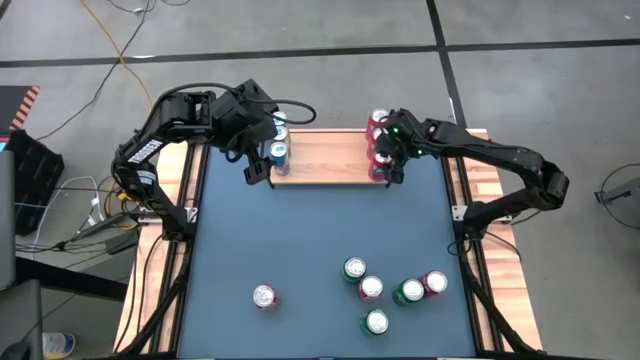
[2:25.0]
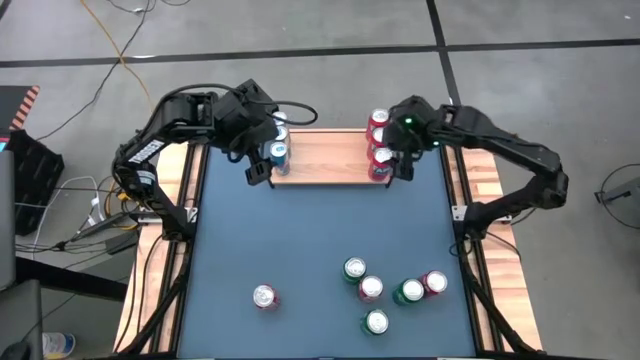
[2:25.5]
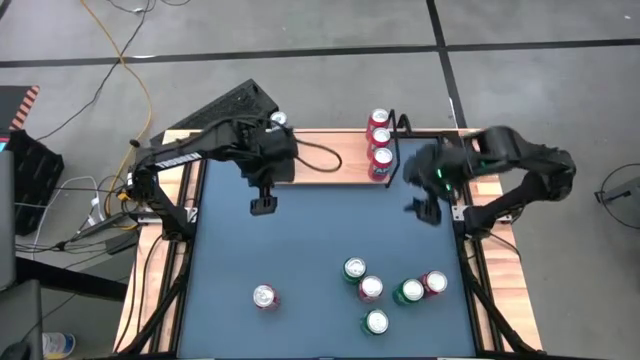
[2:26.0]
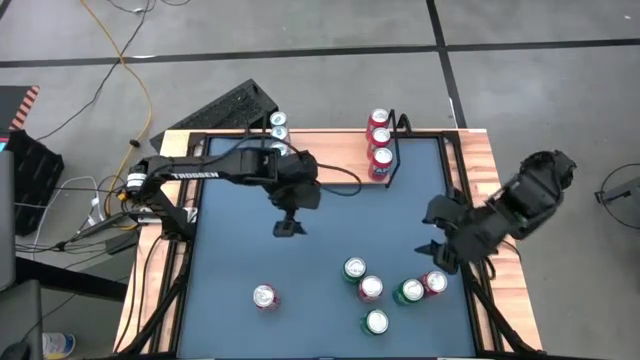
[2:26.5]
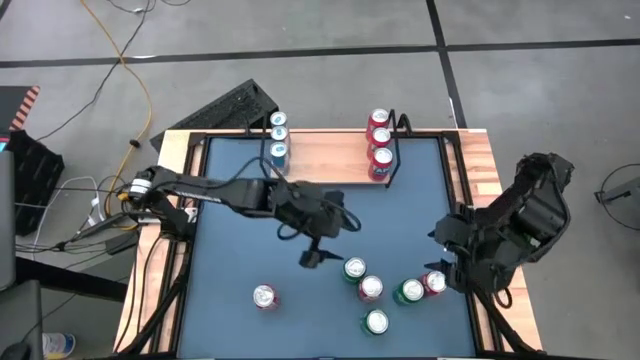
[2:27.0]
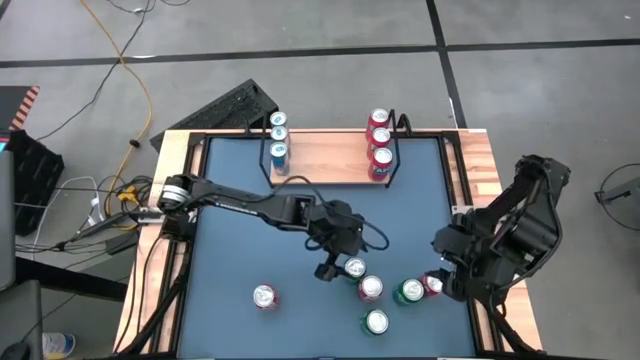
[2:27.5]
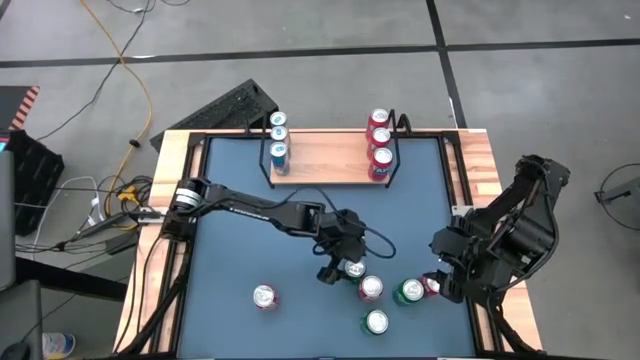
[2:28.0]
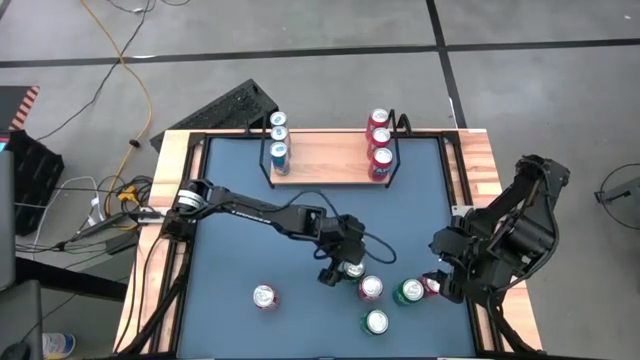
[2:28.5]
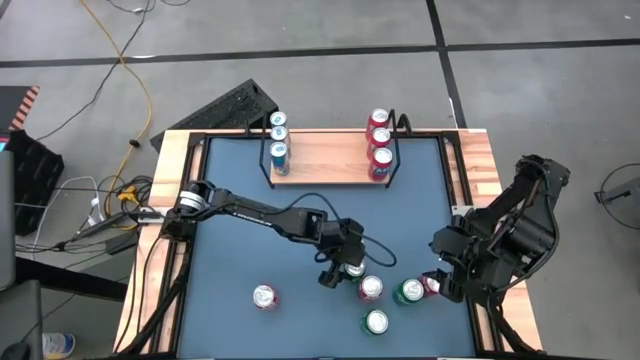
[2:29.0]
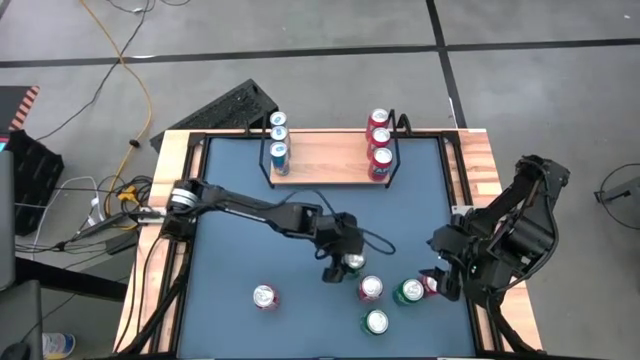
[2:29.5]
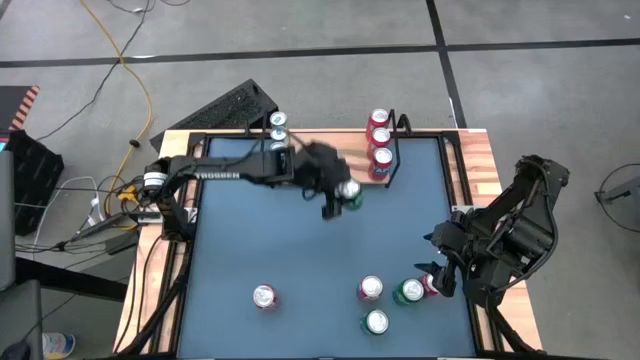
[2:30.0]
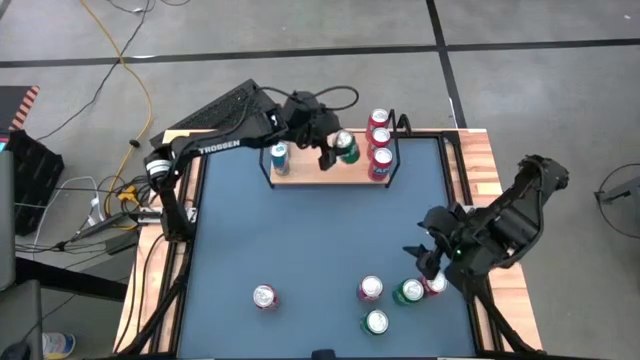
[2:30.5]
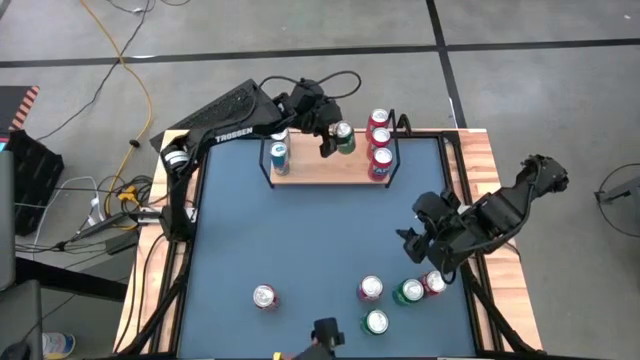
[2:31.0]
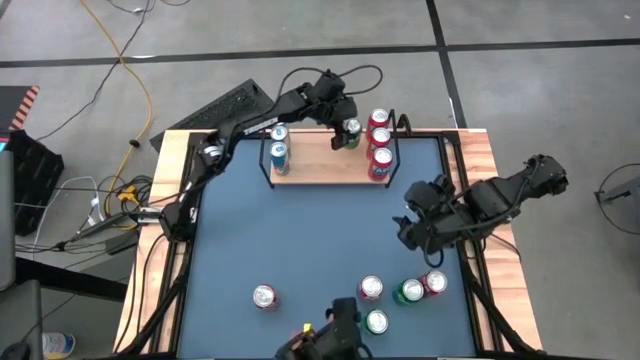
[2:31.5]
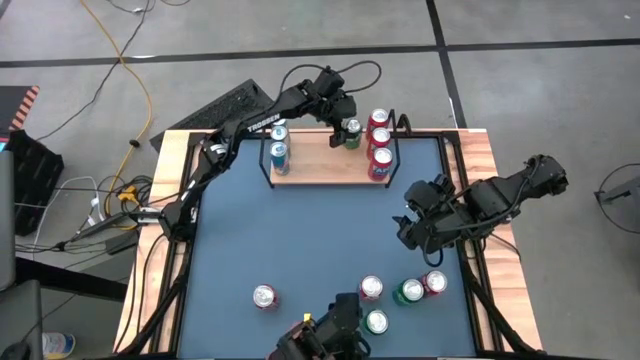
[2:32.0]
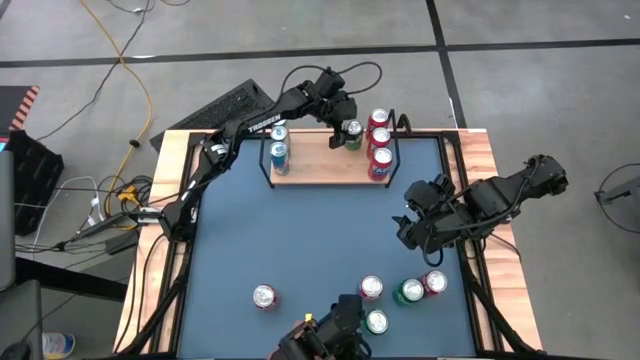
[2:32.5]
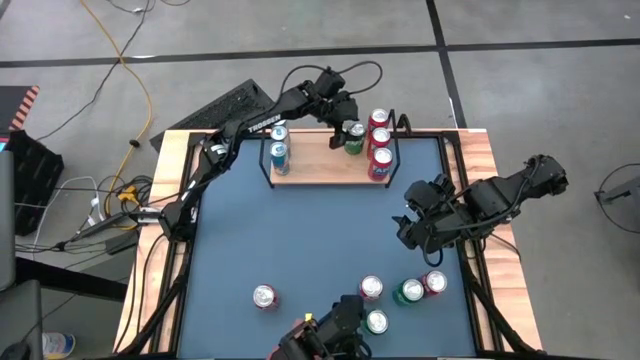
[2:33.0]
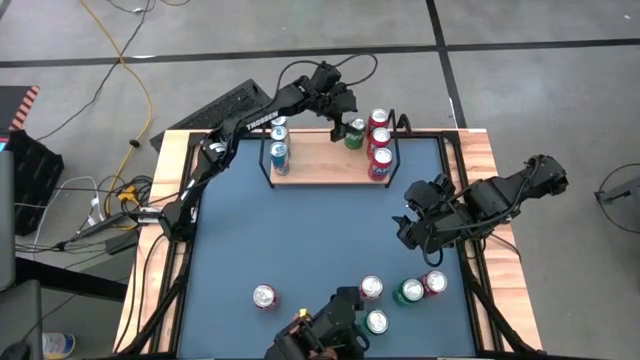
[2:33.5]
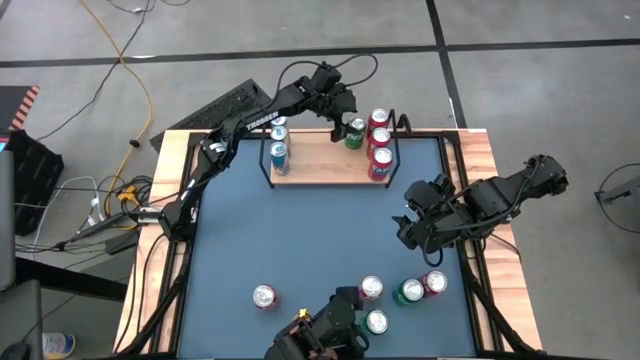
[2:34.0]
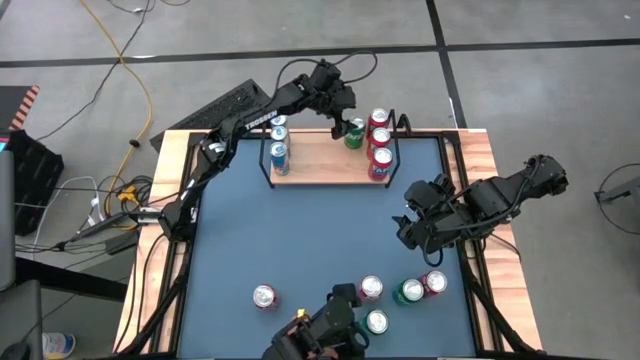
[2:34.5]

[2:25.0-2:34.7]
Task: Place canned beverage on shelf
Put the top green soda can on the shelf

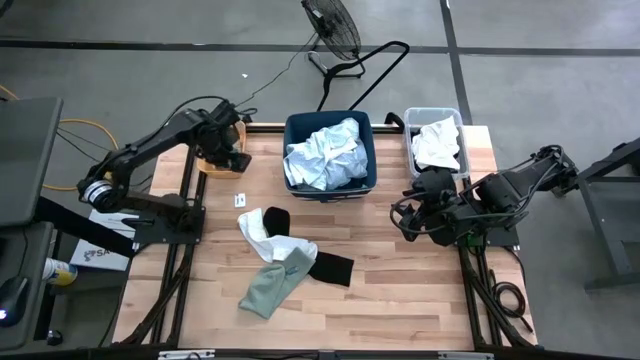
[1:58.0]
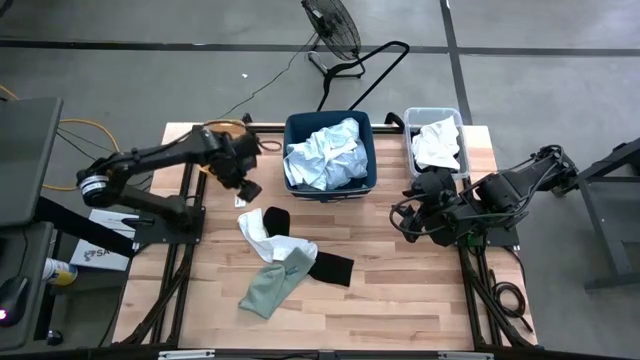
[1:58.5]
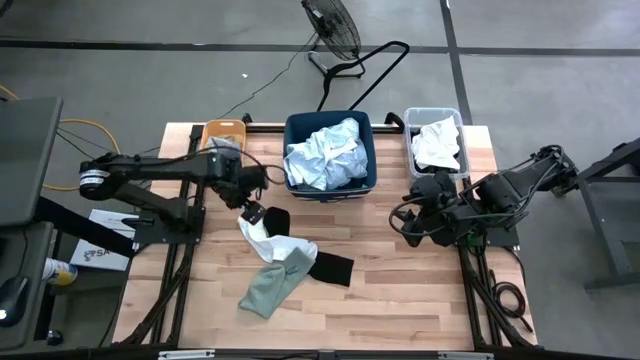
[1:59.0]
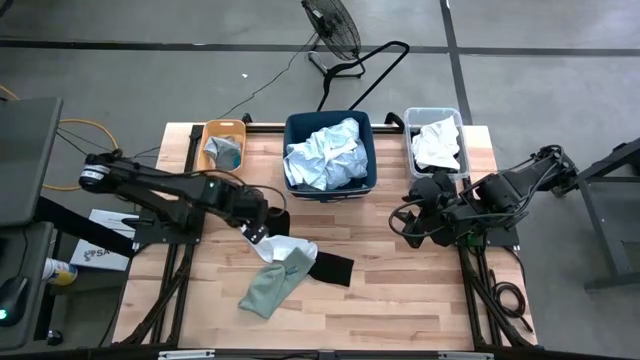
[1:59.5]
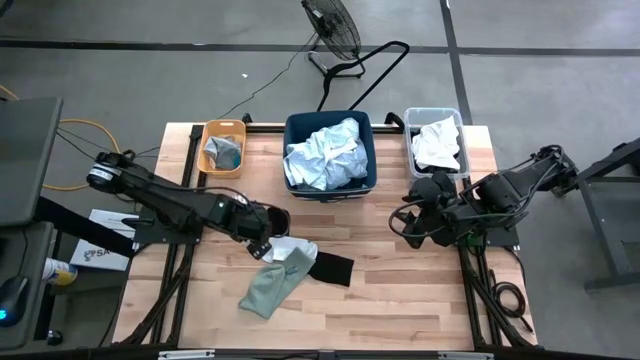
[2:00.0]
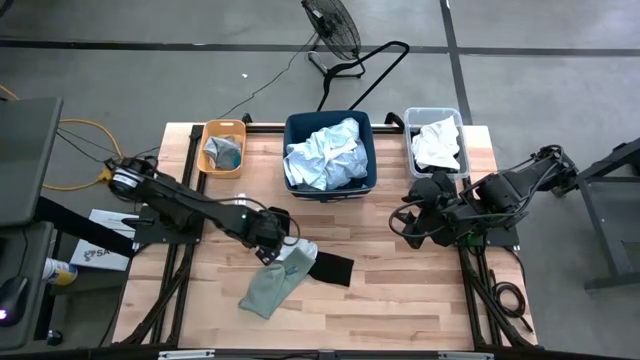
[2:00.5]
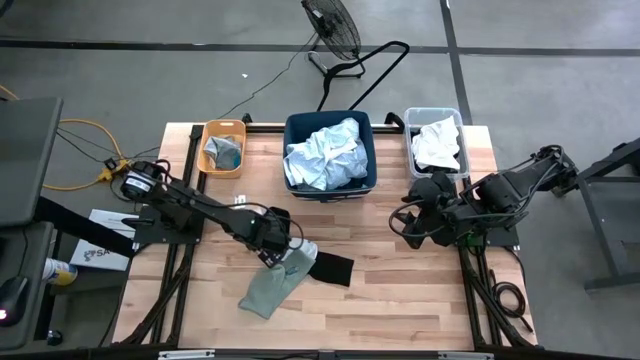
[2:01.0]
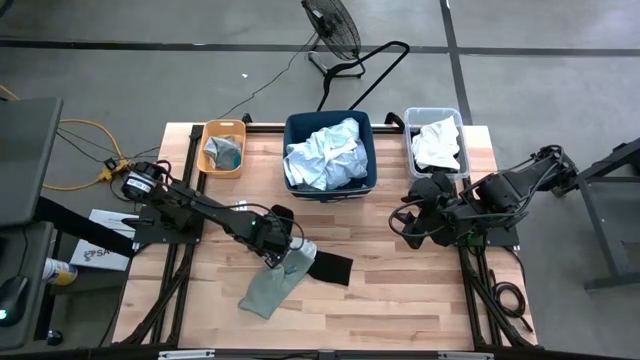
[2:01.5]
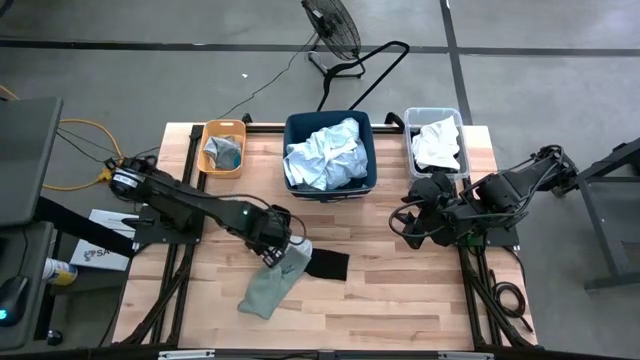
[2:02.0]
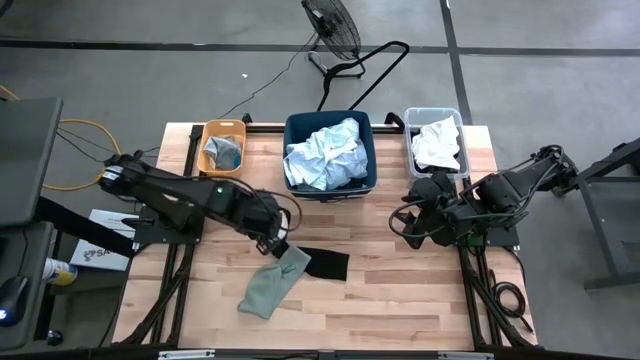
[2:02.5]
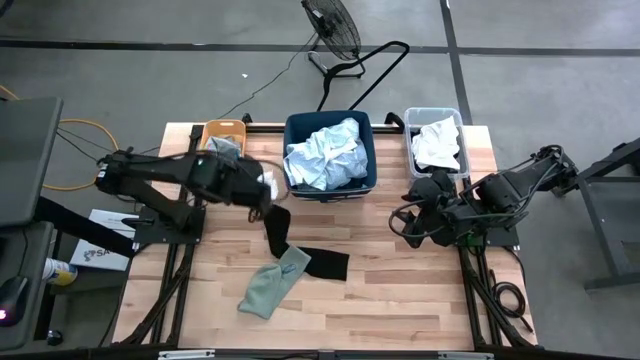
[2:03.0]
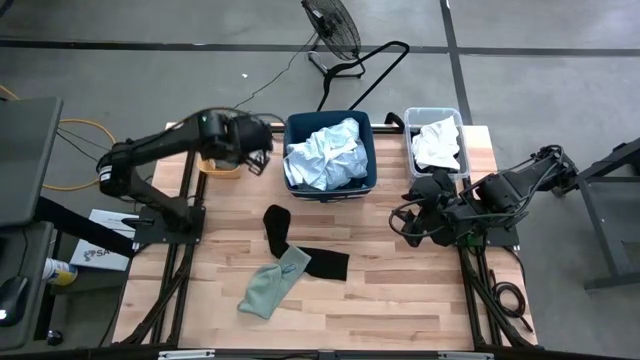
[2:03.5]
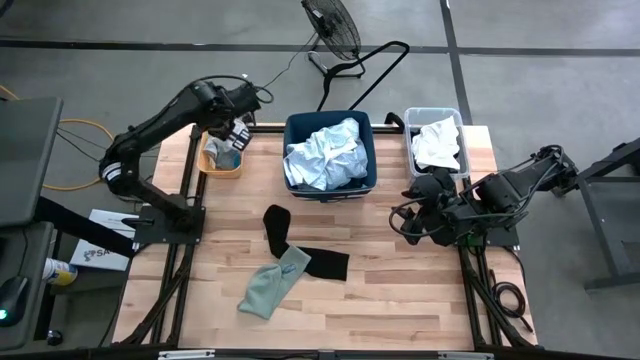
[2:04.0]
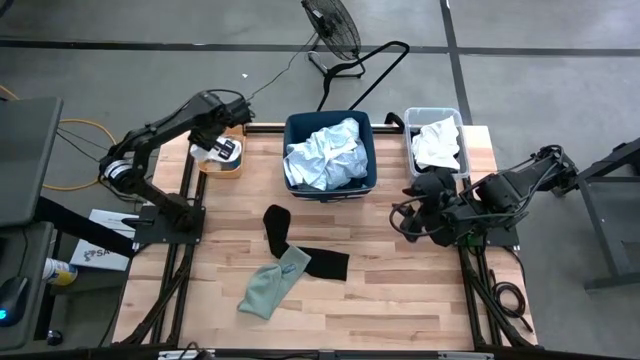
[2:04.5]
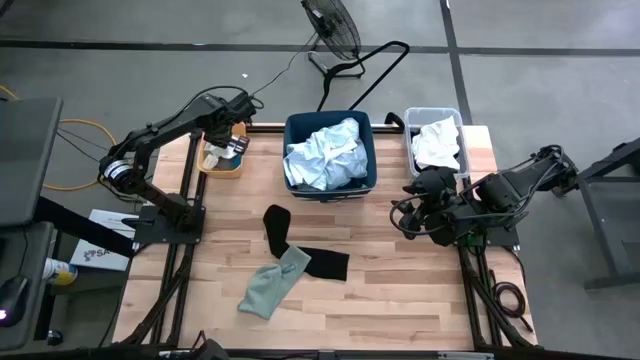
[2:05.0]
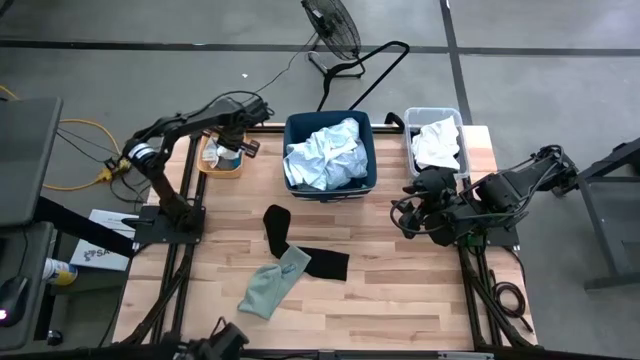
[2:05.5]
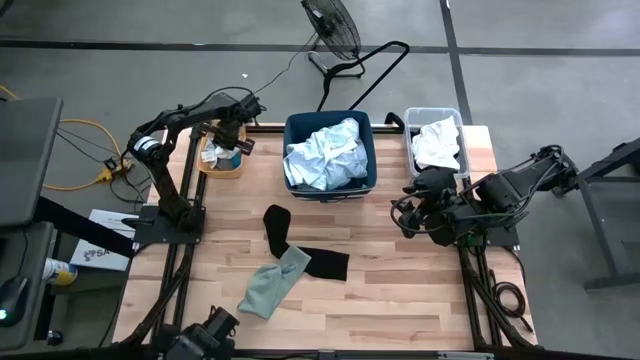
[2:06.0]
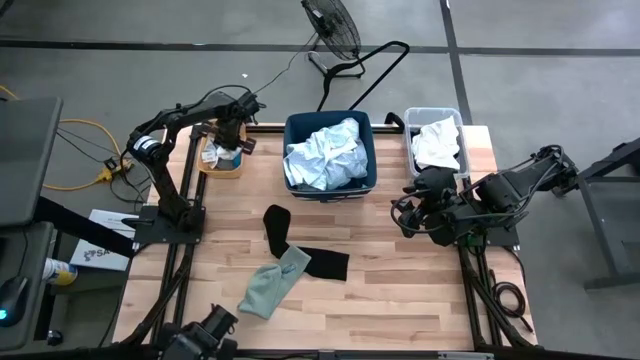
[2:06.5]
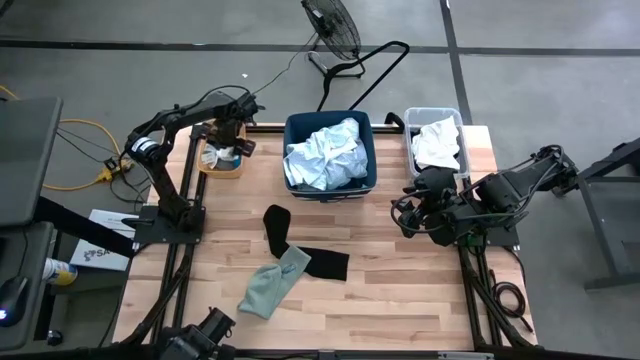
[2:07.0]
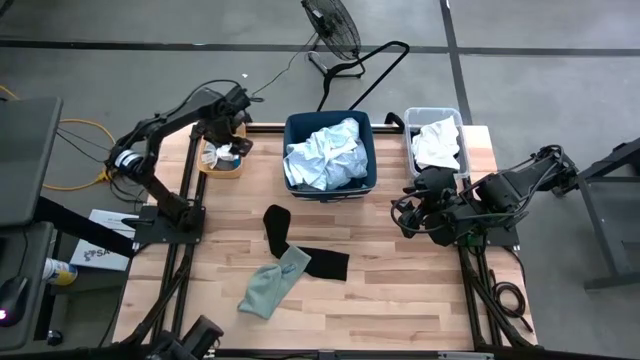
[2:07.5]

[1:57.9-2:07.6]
Task: Pick & Place Cloths
Put the white sock into the yellow bin
